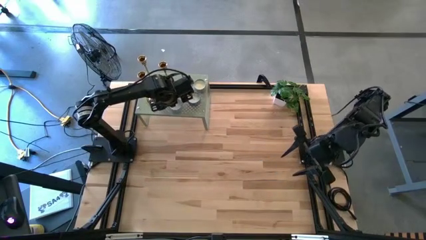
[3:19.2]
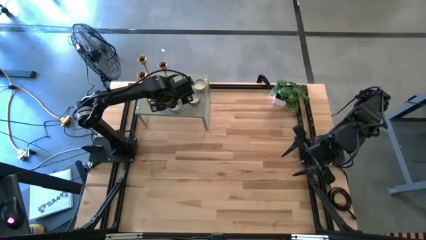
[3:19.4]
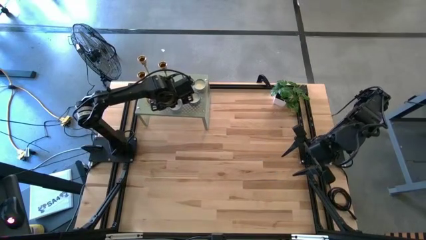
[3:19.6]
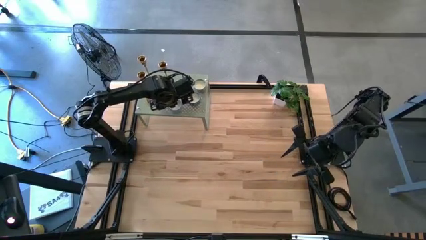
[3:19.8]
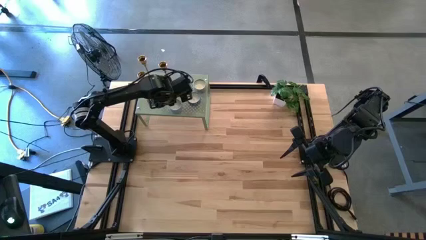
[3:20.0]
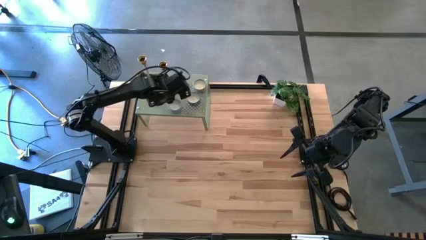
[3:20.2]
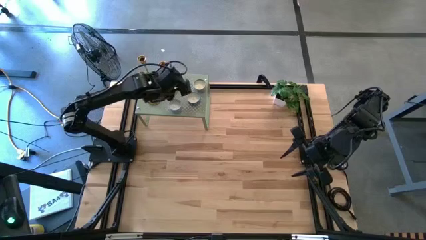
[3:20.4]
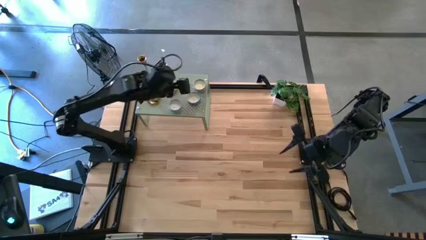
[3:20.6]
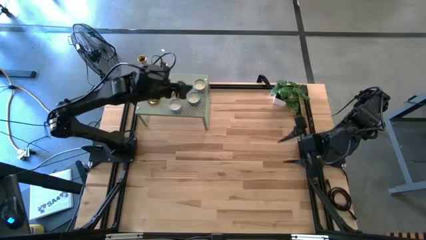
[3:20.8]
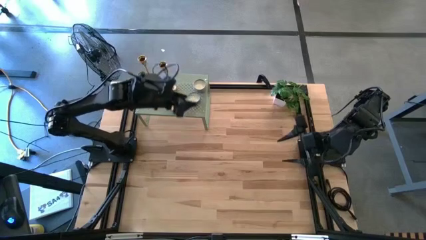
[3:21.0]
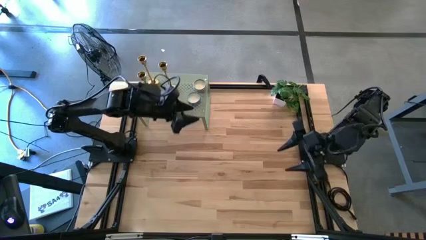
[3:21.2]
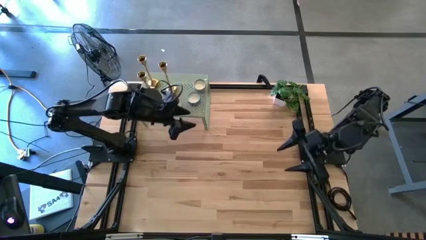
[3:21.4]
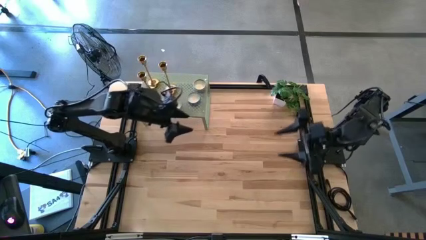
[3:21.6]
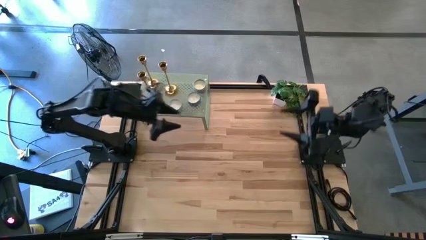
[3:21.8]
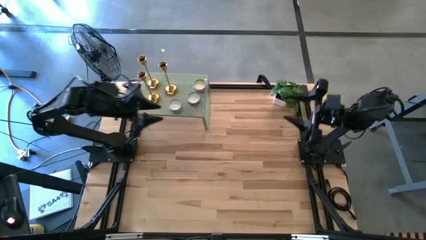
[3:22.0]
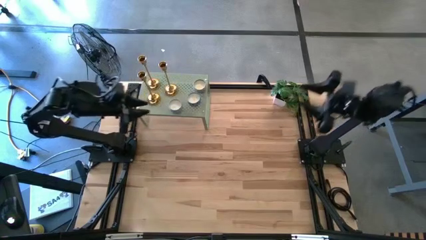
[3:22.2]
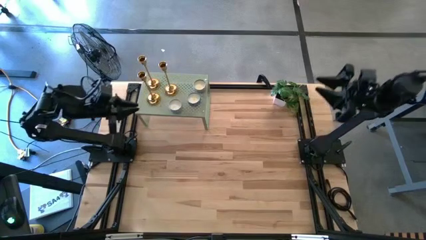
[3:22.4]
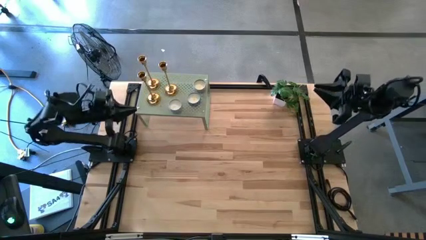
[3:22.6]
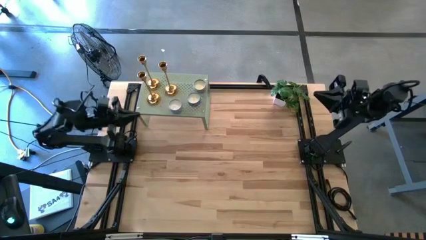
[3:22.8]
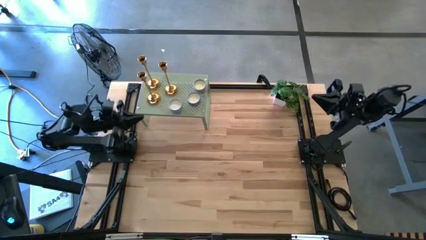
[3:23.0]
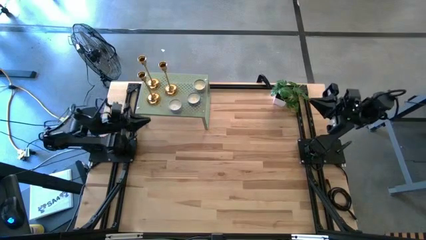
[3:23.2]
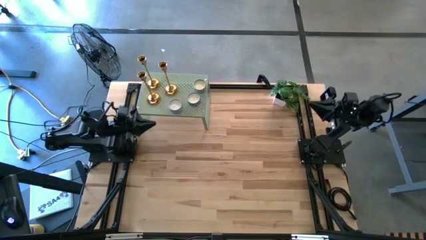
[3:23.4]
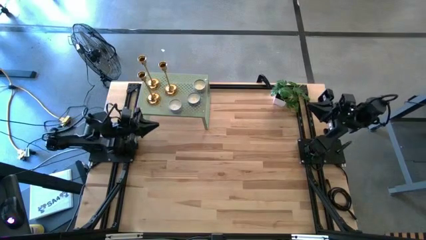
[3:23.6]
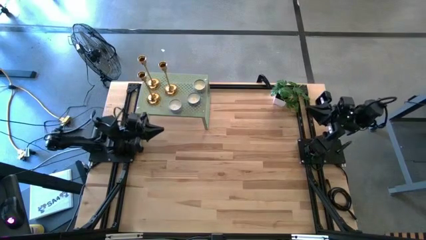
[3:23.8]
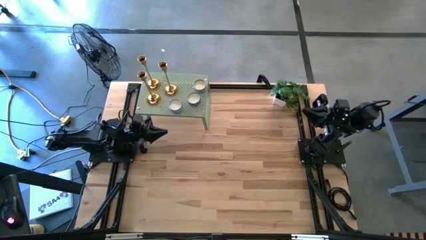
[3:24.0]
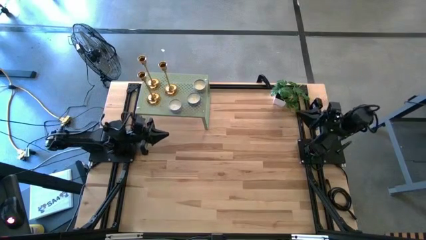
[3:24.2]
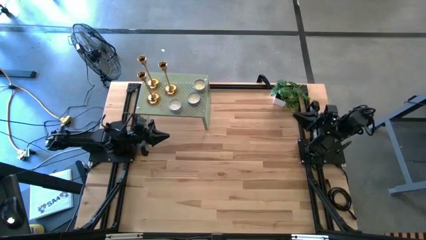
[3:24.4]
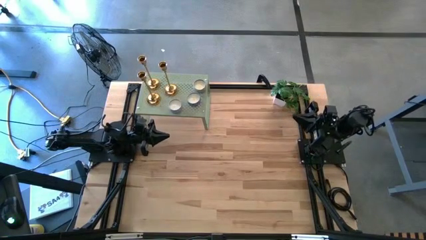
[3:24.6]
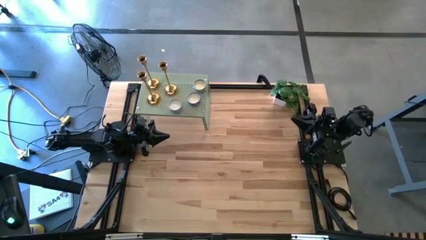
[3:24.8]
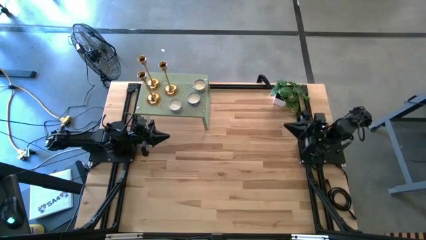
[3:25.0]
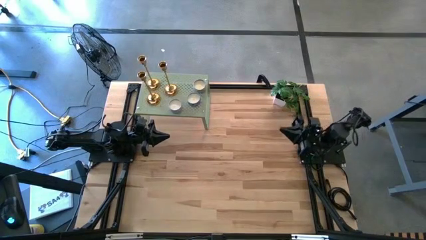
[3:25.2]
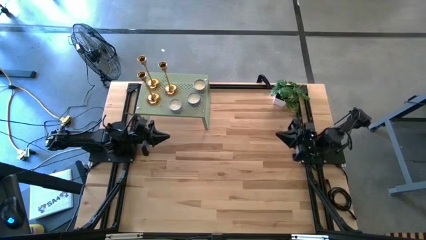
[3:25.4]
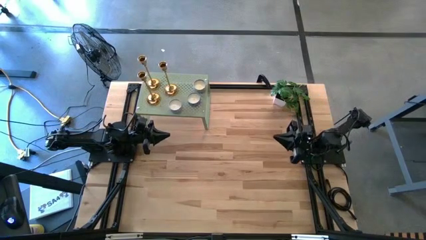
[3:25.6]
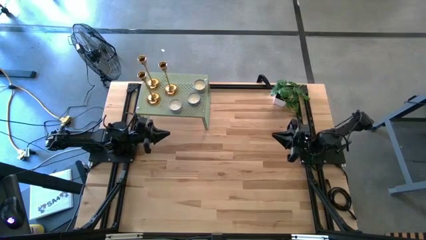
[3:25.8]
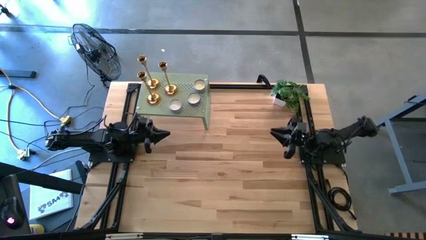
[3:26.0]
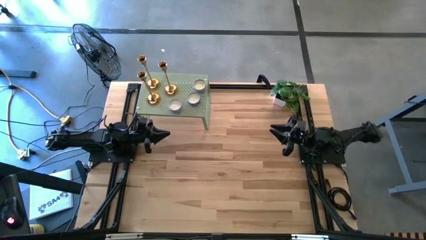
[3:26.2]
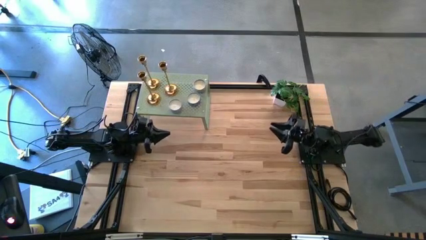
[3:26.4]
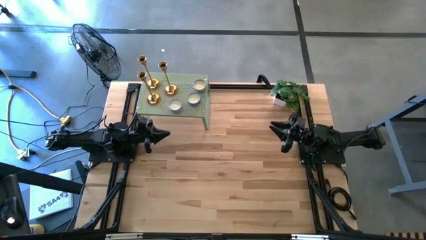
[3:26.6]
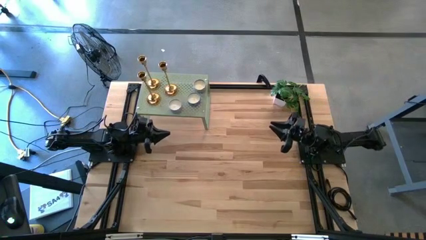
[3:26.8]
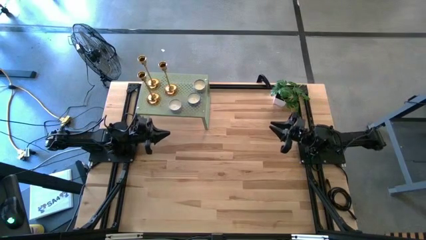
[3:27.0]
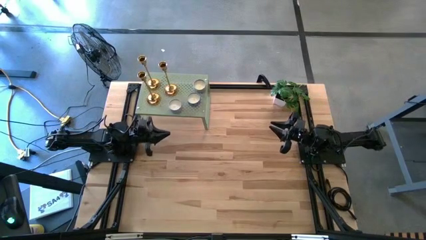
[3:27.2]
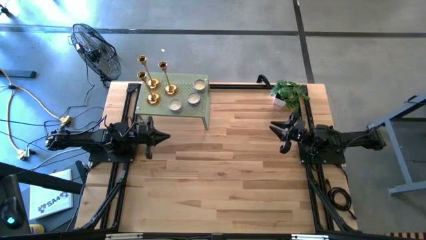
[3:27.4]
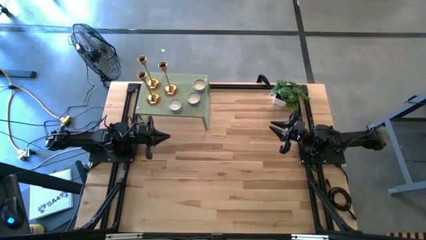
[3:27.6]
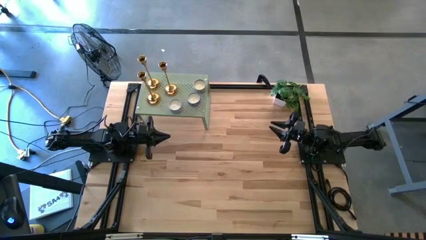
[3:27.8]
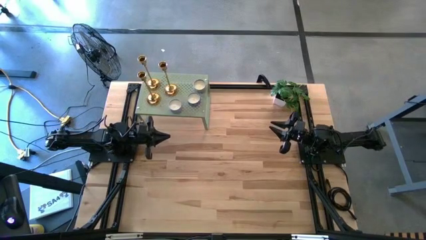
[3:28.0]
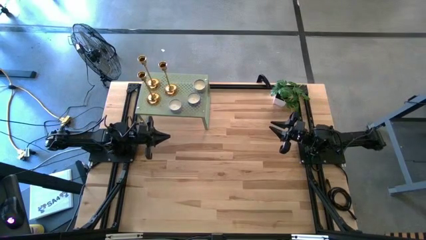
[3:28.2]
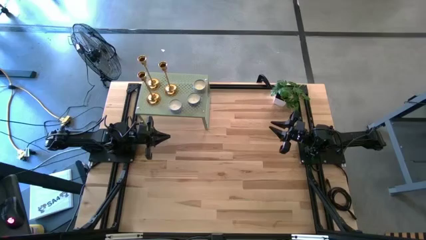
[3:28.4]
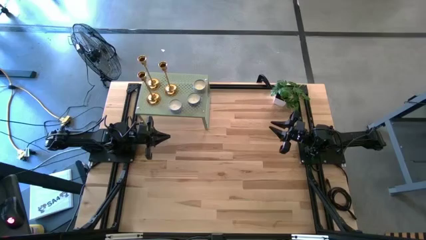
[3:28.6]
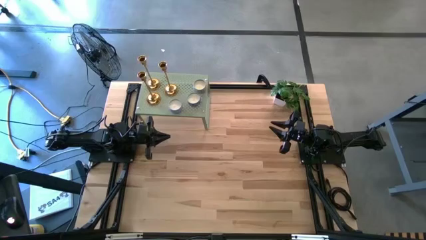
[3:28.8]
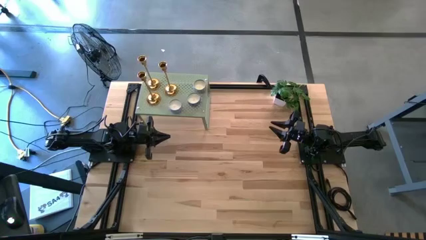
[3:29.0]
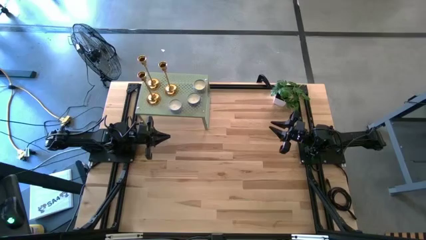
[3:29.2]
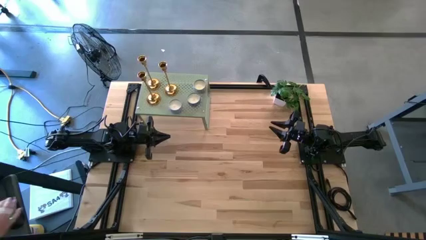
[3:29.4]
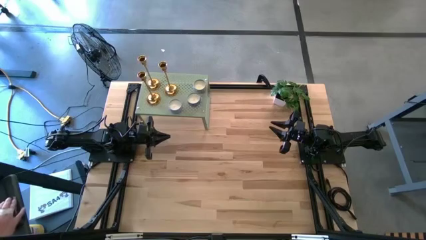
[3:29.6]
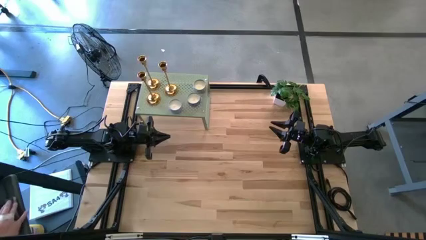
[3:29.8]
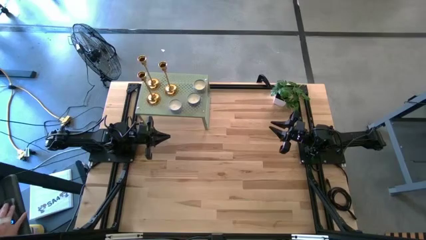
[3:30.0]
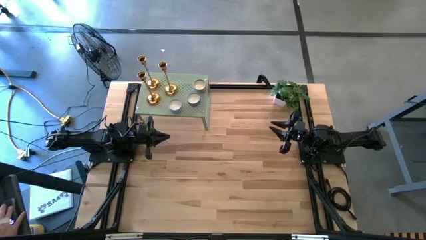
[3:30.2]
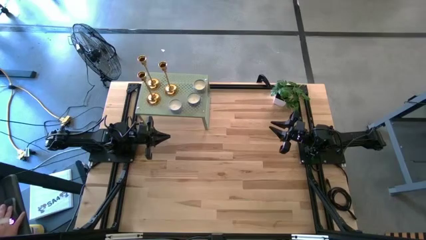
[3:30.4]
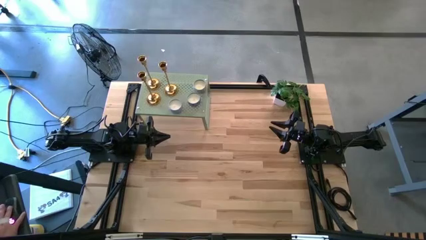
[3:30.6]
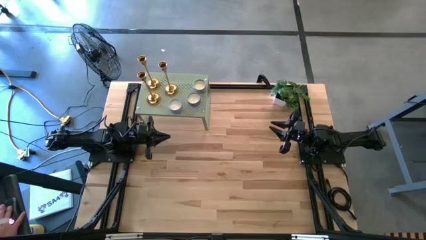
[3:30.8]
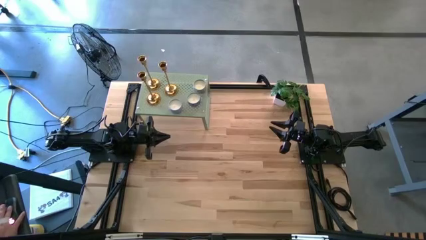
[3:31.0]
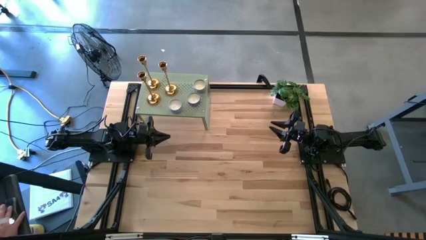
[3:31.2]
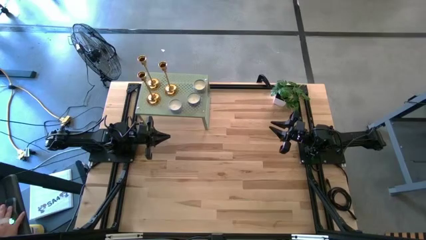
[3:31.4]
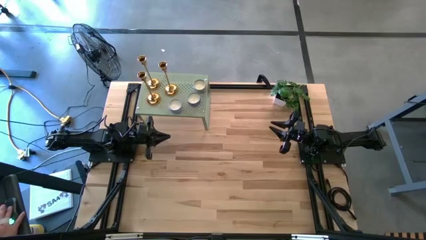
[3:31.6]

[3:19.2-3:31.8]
Task: Pick & Place candle stick holders
Return to Home Position

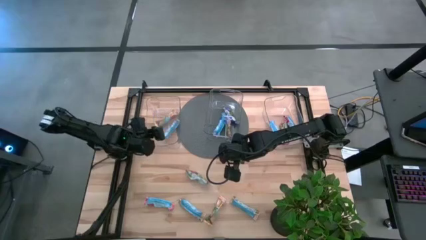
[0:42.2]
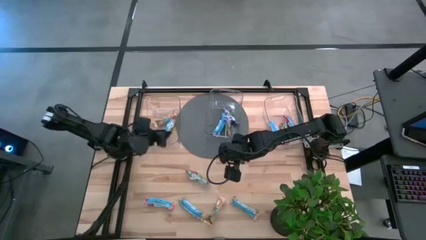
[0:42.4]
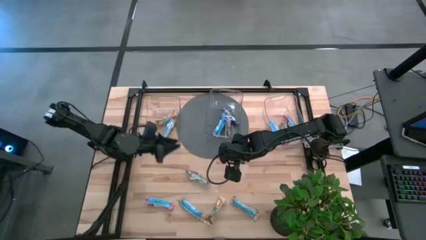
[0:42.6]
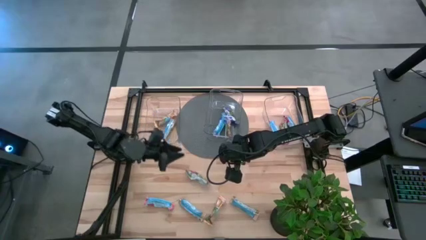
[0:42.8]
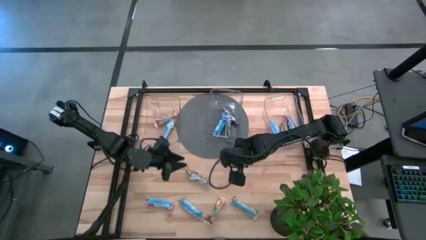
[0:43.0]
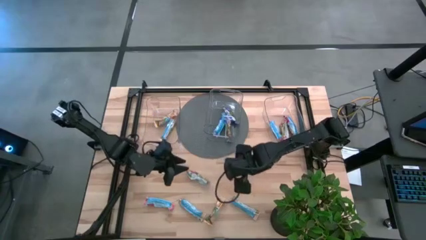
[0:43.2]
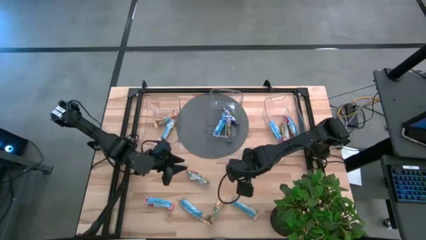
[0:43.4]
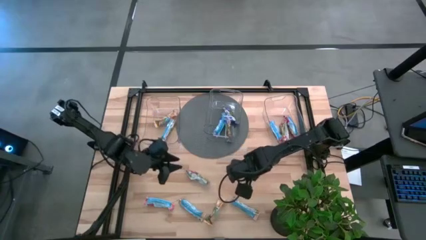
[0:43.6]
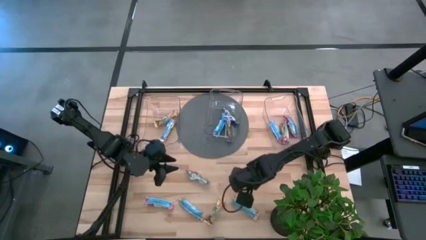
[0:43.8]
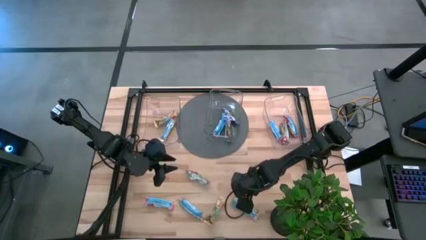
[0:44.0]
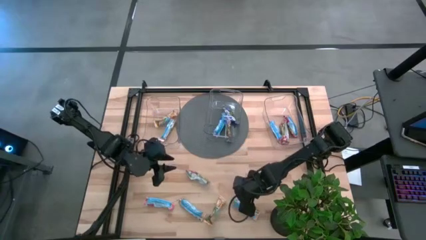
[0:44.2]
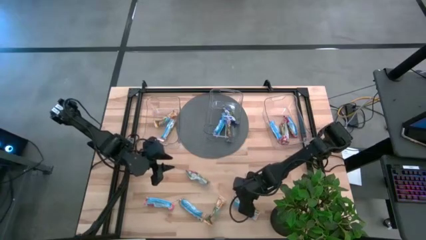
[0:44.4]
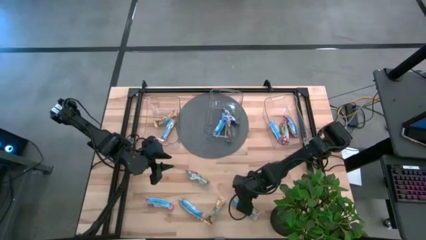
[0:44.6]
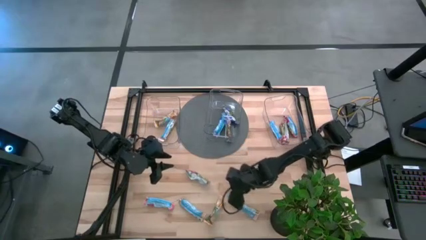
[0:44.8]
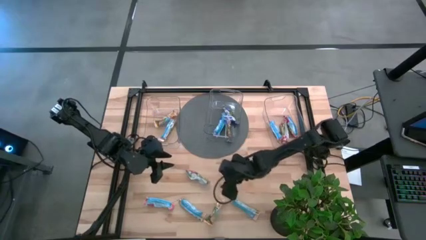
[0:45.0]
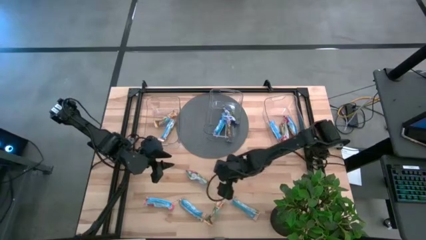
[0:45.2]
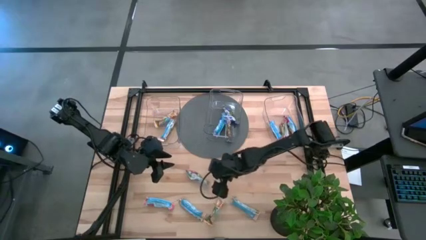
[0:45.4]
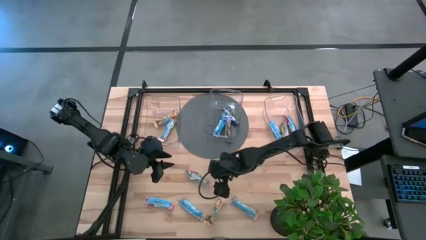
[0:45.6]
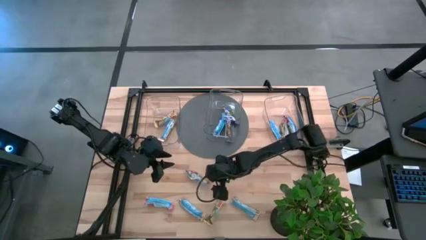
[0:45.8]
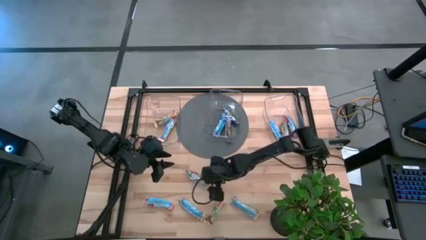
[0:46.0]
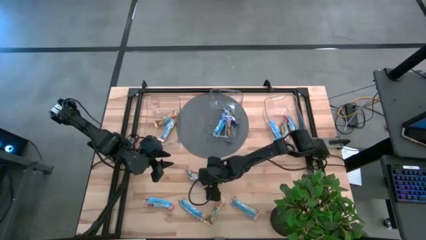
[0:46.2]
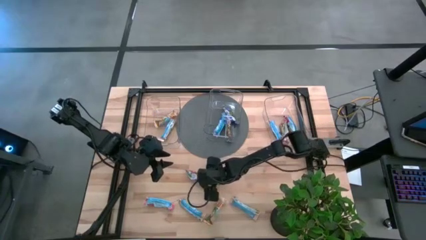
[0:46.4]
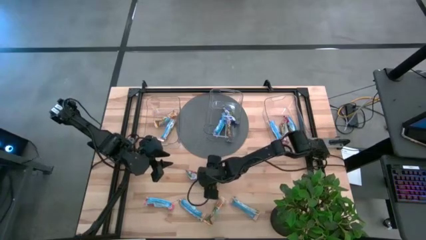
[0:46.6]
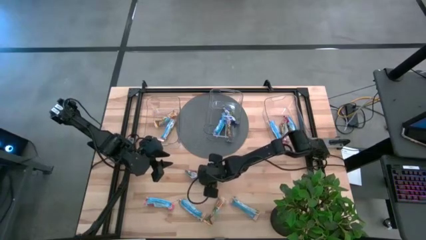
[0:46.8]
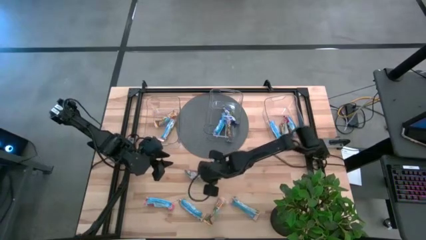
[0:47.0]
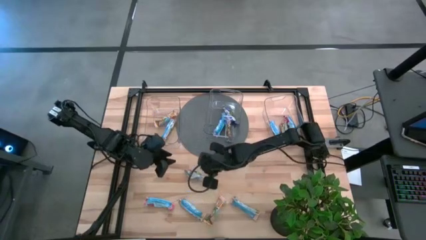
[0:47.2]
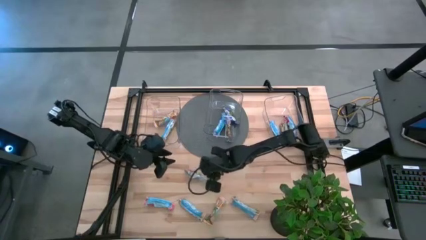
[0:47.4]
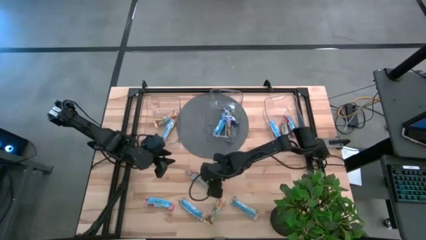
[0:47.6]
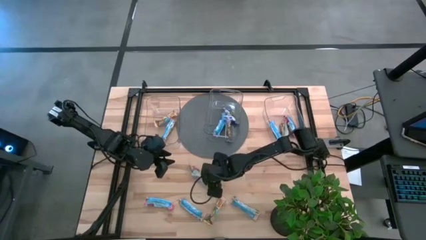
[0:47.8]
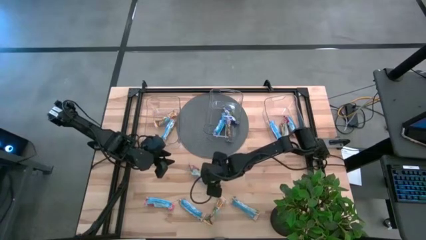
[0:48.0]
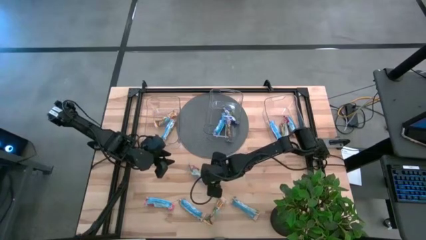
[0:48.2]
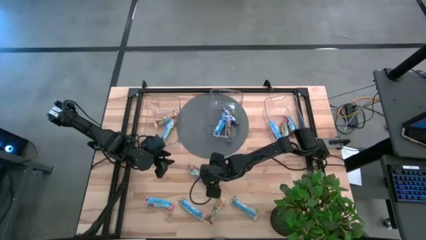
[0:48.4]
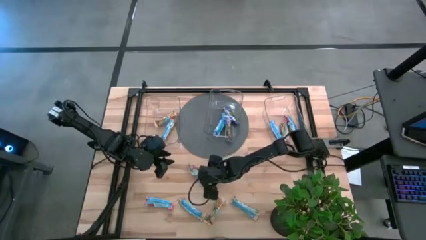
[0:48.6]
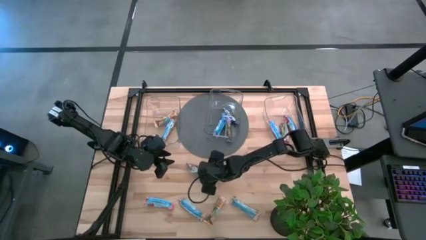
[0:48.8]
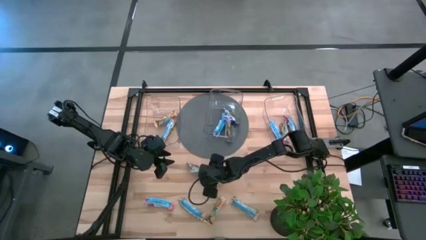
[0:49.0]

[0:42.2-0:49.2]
Task: Pick and place Granola Bars by type
Put the red granola bar into the right transparent bin
